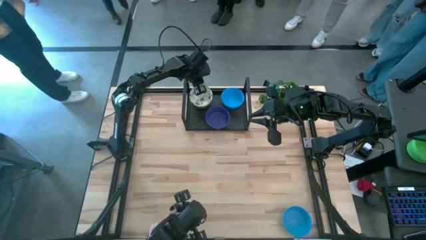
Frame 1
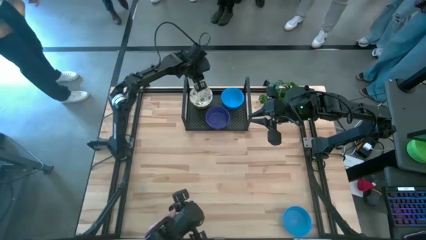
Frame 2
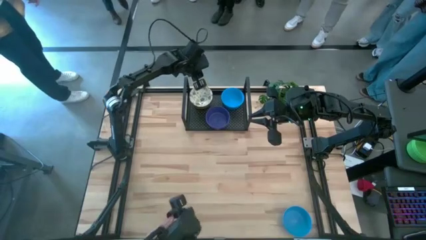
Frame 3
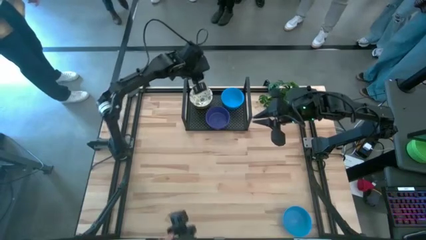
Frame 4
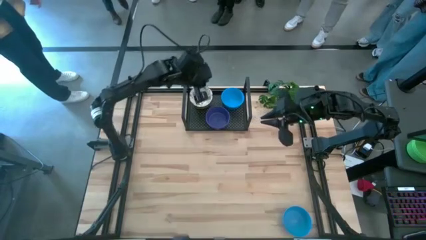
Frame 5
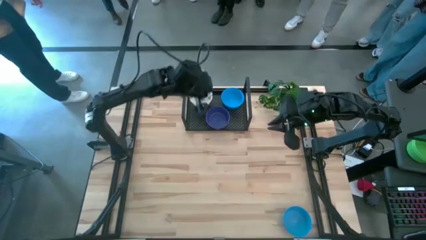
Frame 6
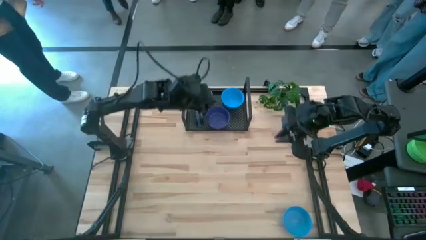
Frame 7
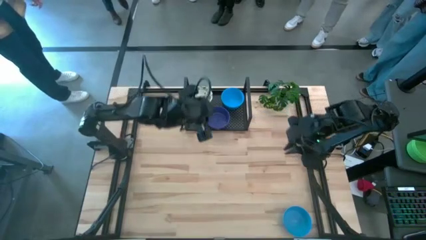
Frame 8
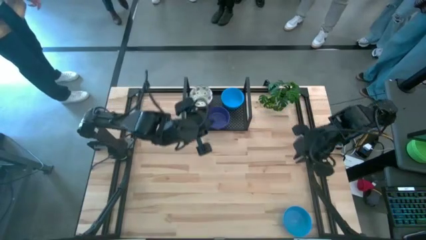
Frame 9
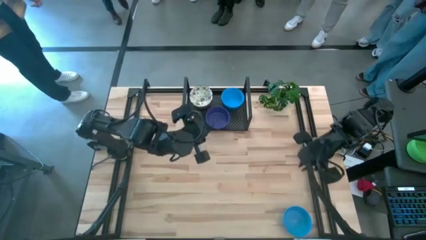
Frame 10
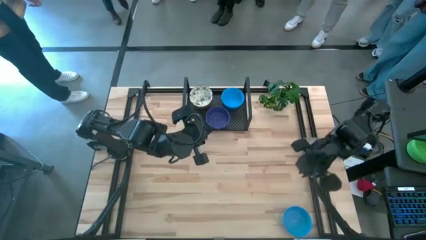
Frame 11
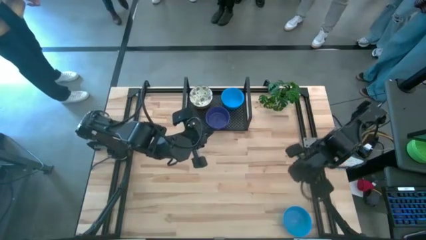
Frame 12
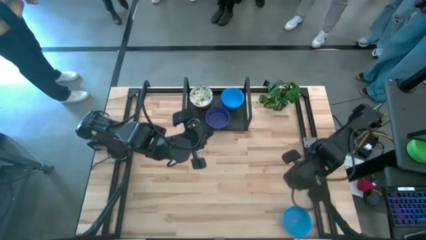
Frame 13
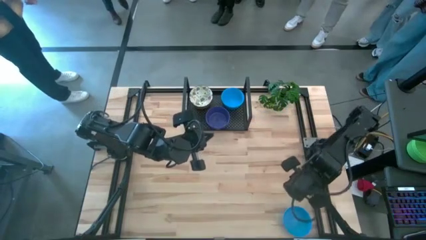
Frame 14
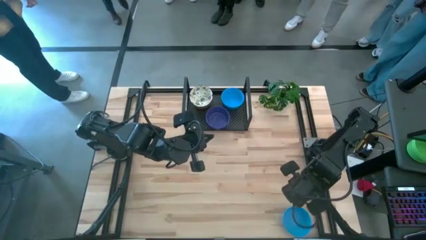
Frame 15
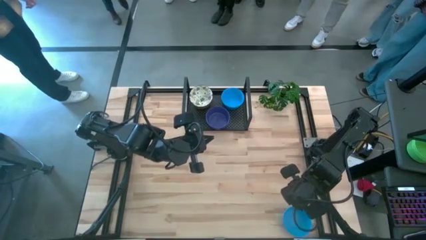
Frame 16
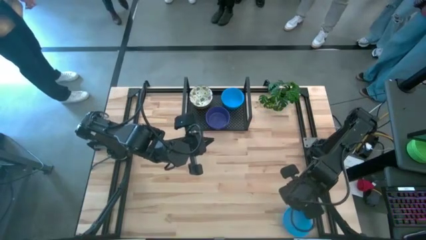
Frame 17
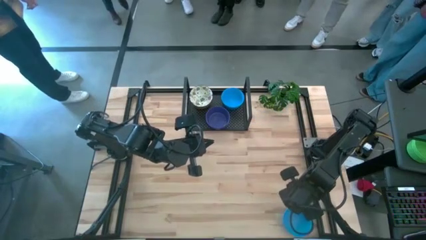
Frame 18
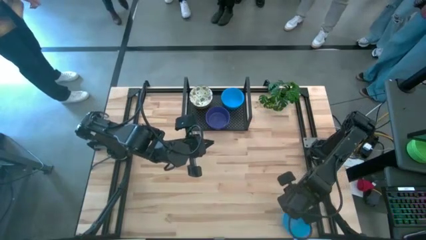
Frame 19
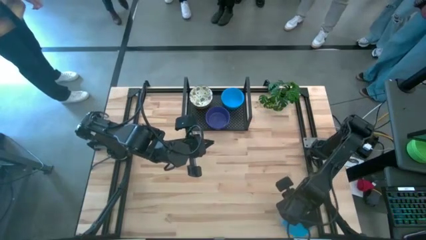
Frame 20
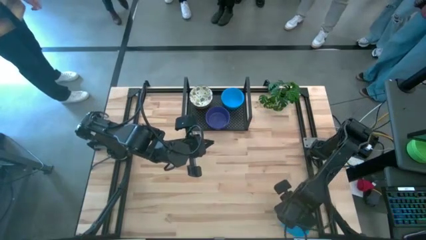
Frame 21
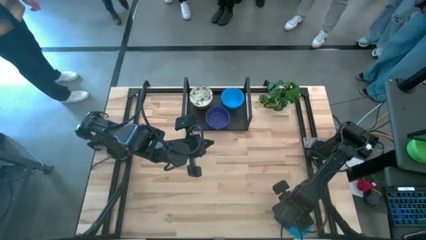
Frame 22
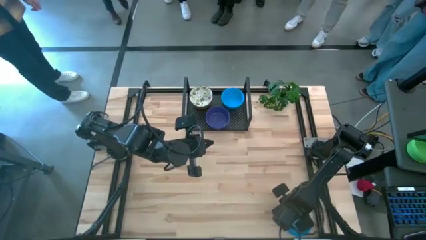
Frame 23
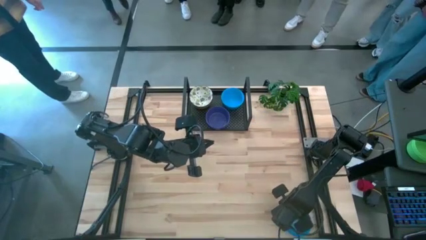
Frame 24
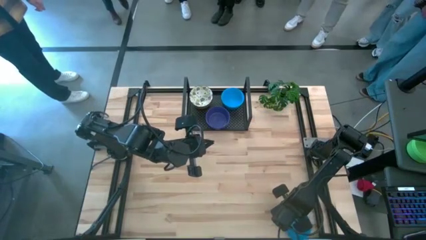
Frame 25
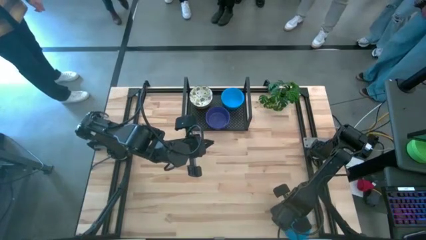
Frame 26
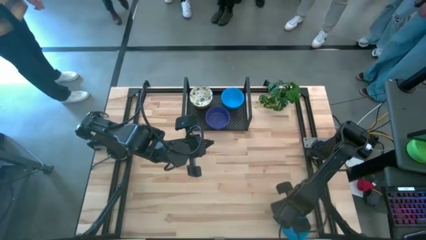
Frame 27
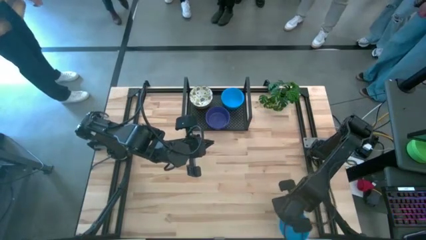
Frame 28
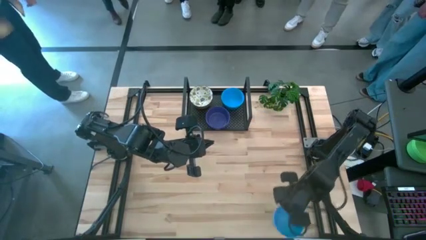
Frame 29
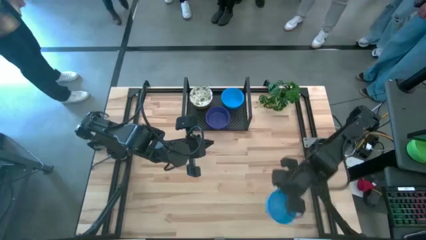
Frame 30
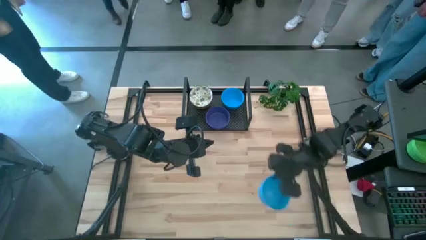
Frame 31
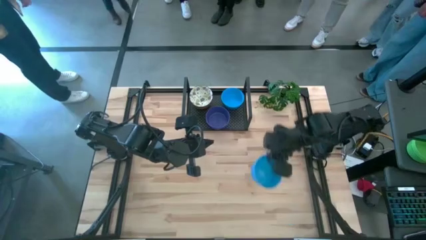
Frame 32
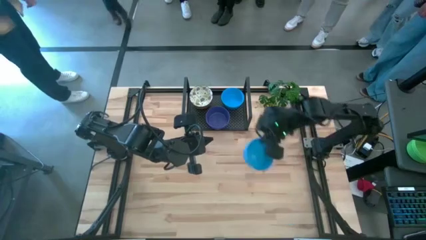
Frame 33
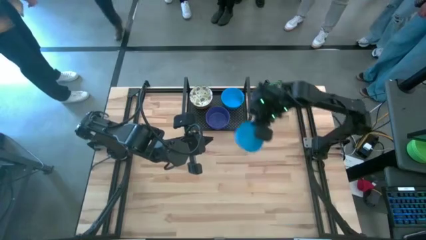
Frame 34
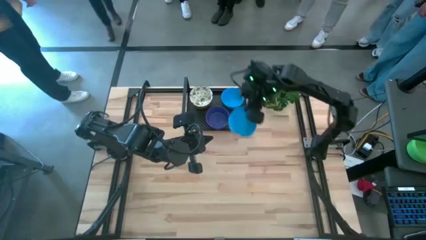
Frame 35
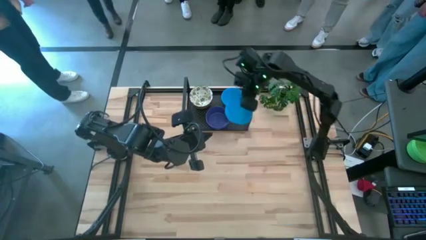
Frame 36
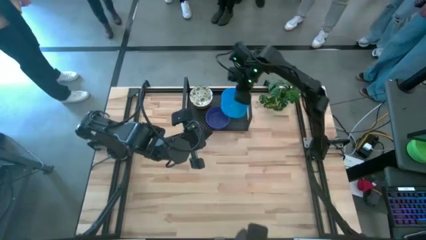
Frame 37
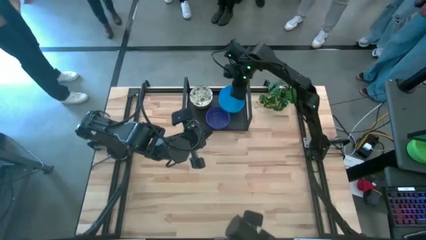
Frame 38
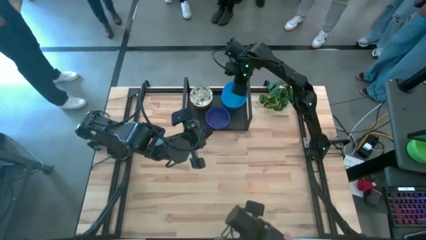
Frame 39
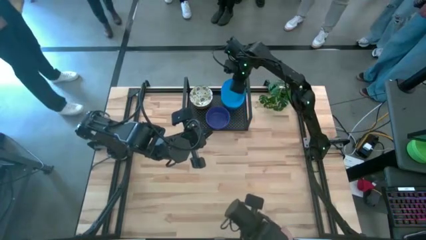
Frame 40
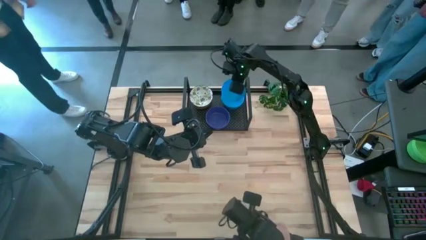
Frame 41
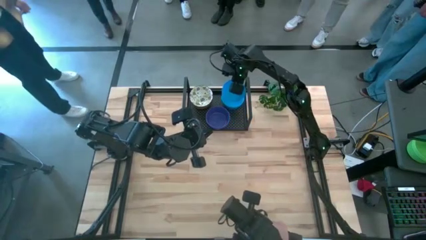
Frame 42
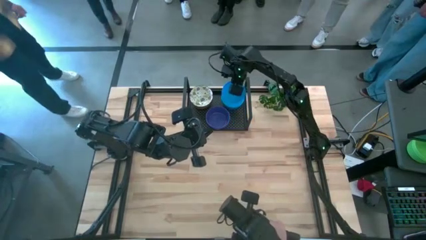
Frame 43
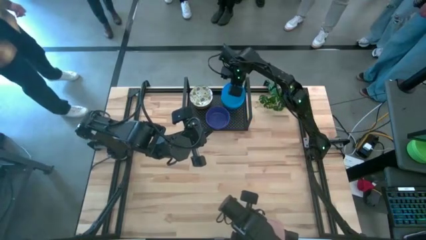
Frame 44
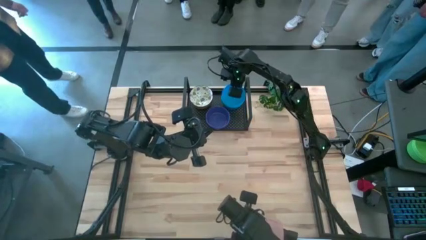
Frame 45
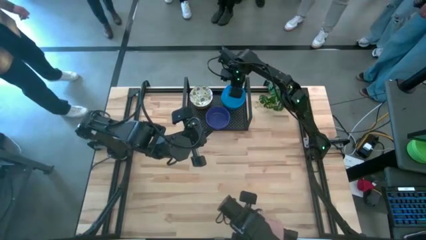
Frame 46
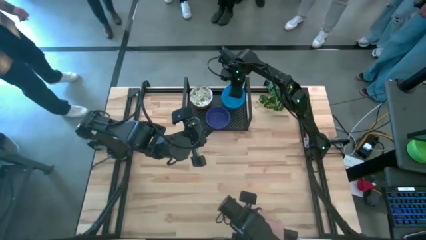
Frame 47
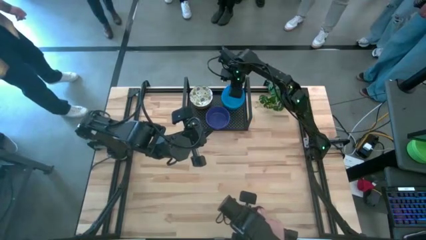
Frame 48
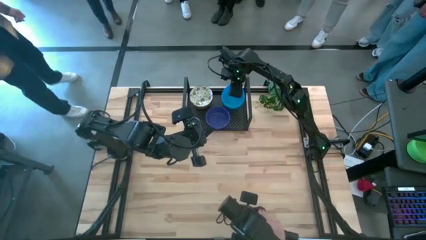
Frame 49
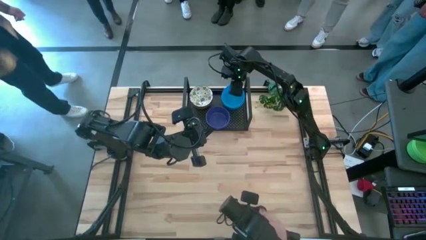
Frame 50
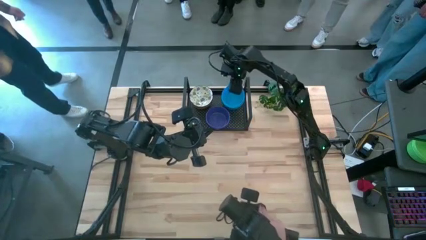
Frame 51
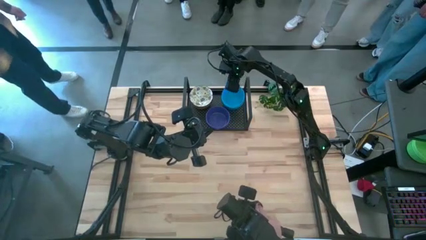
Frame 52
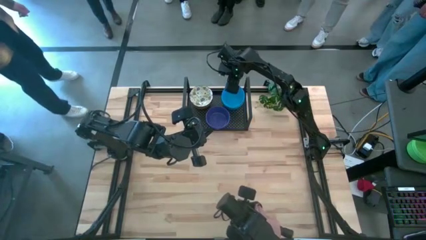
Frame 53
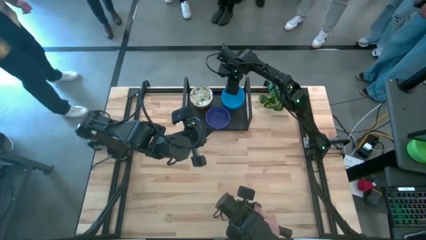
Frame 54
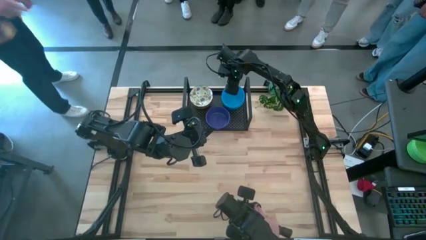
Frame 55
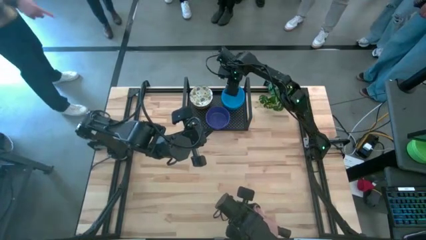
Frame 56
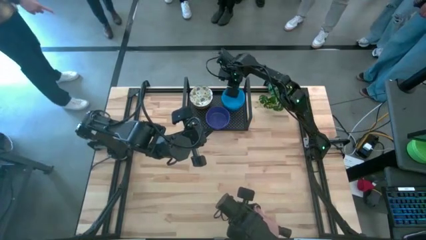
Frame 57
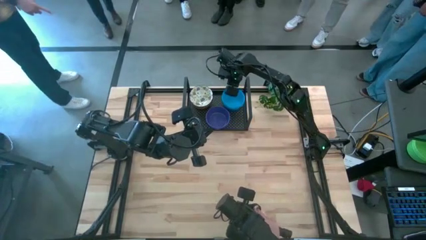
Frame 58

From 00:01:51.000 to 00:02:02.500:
Task: Pick & Place Mini bowls
Stack the blue bowl on top of the blue bowls on the shelf

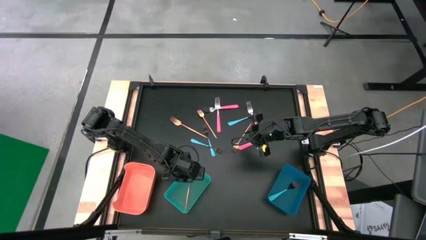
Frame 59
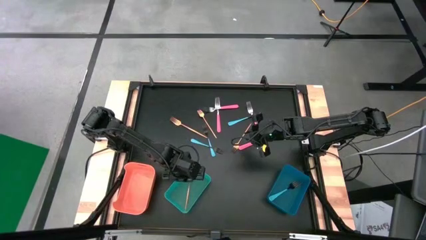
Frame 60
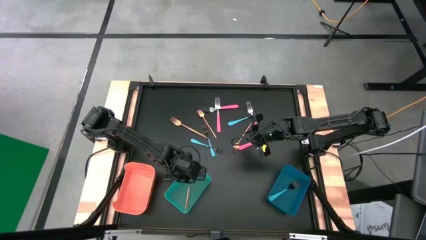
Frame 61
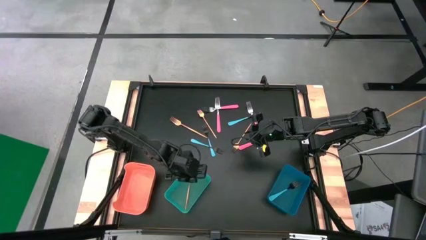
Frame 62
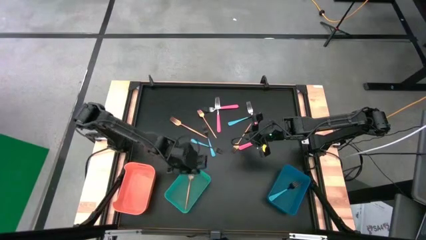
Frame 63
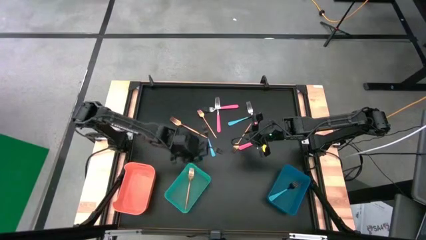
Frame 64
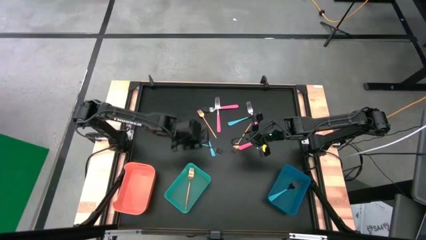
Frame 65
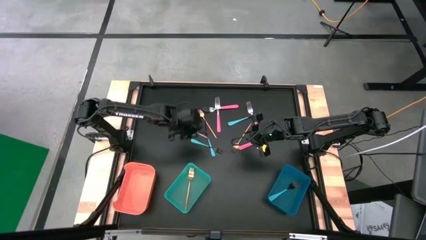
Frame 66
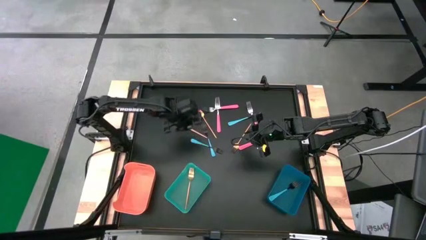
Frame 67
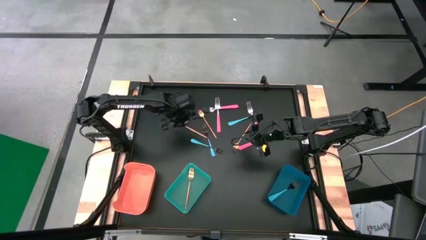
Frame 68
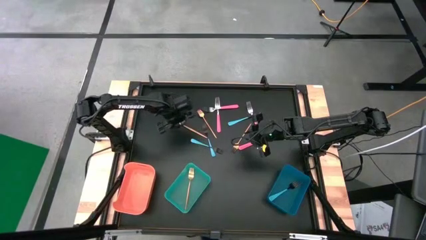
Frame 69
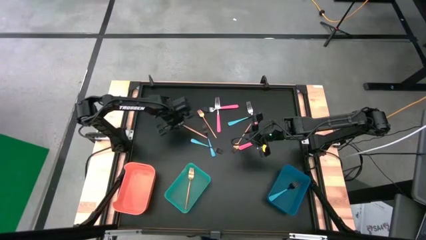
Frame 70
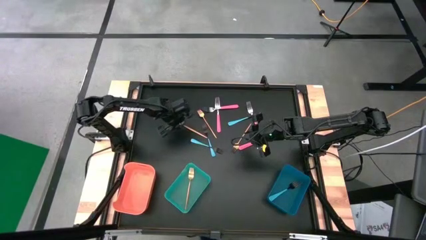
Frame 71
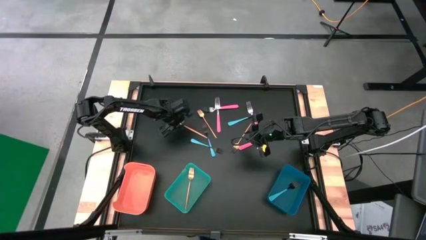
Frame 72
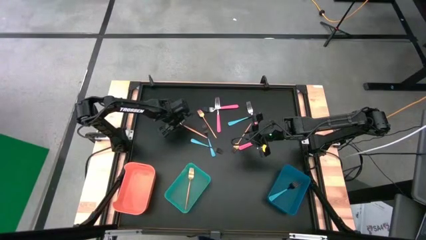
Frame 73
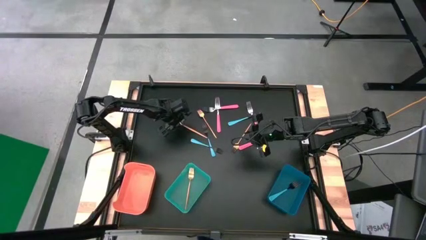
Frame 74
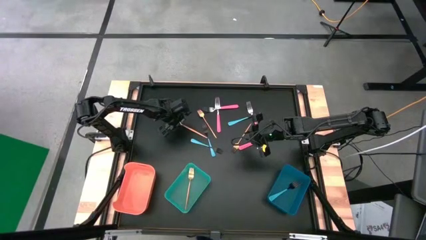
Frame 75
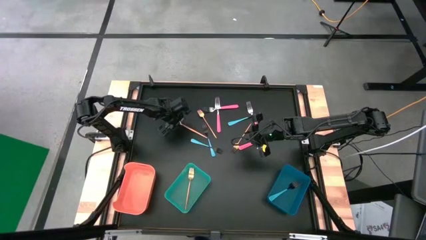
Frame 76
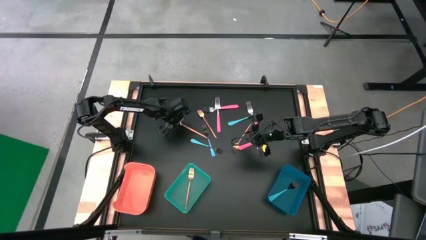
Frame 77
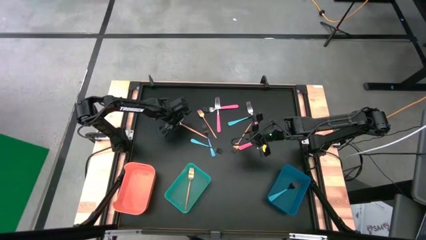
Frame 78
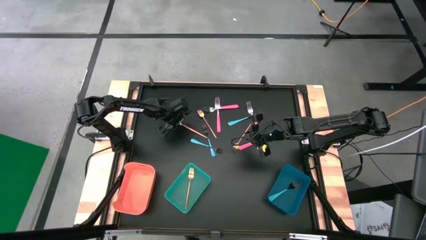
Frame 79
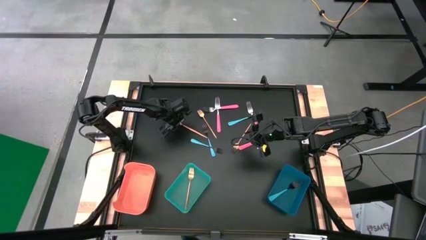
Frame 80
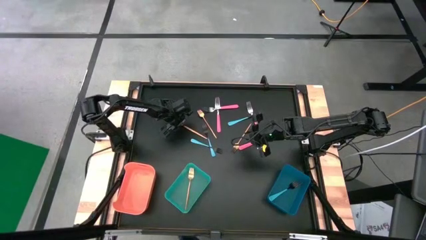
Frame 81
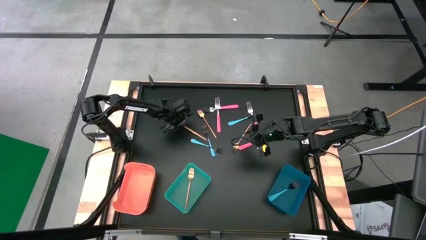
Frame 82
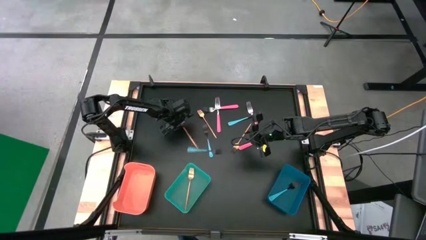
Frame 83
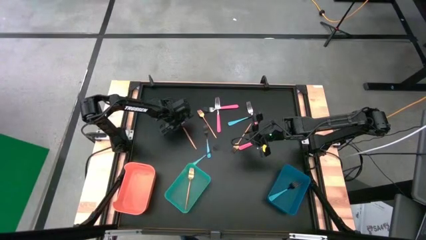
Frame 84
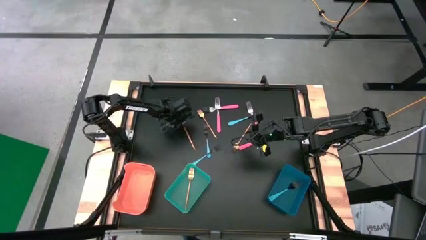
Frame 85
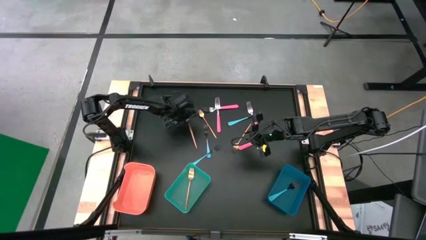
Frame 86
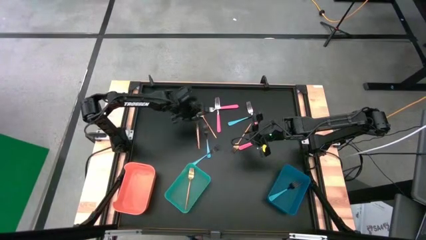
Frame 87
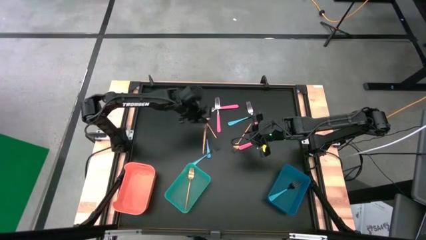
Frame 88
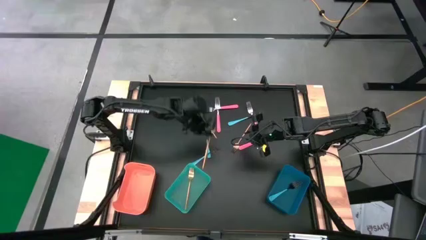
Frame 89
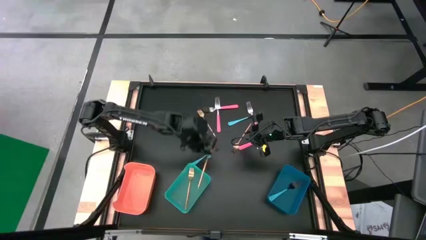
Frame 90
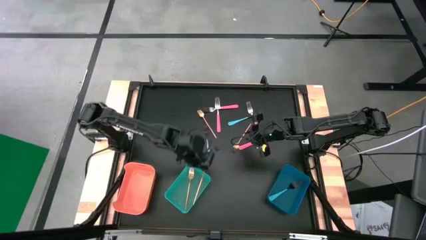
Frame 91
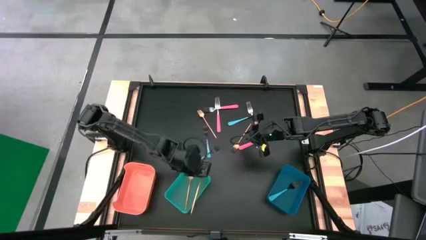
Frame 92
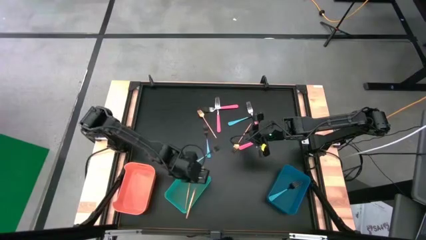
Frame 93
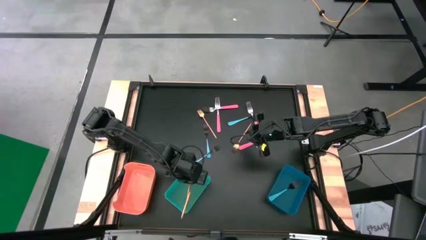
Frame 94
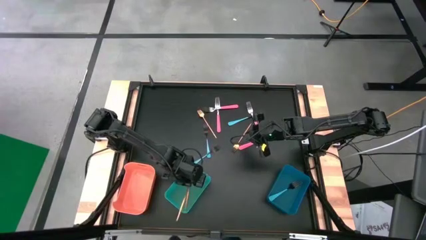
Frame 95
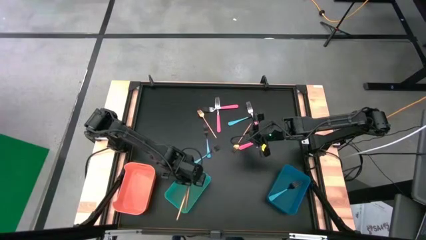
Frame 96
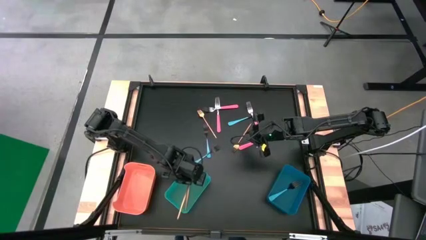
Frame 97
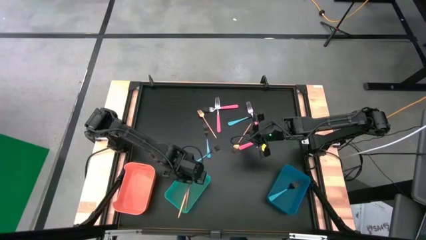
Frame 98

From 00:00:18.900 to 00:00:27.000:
Task: Sort silverware by color (type)
Put the gold fork into the green bin
